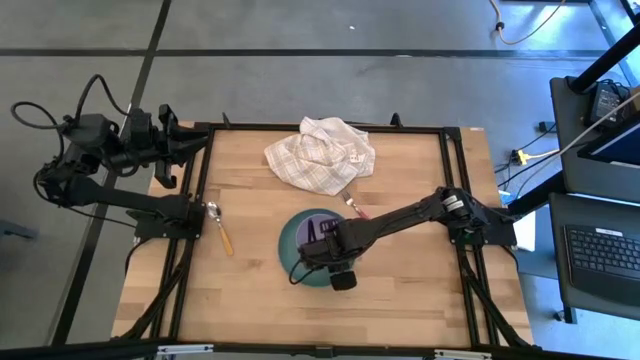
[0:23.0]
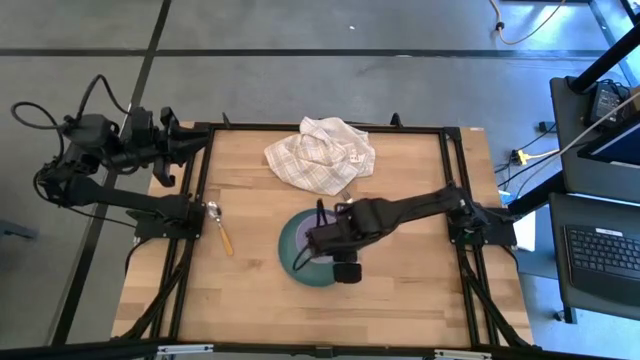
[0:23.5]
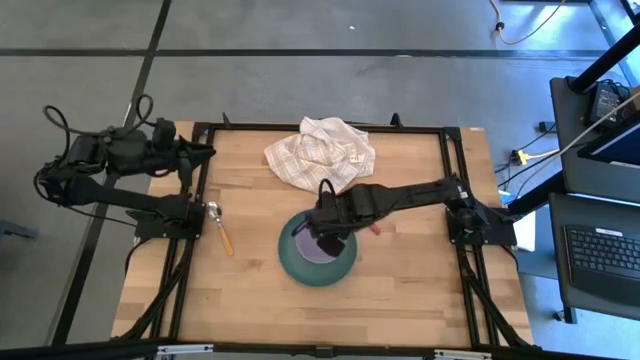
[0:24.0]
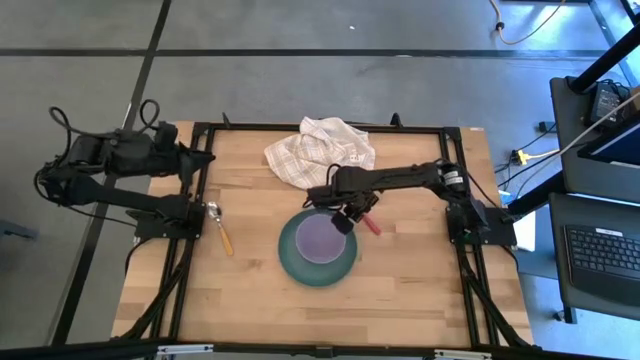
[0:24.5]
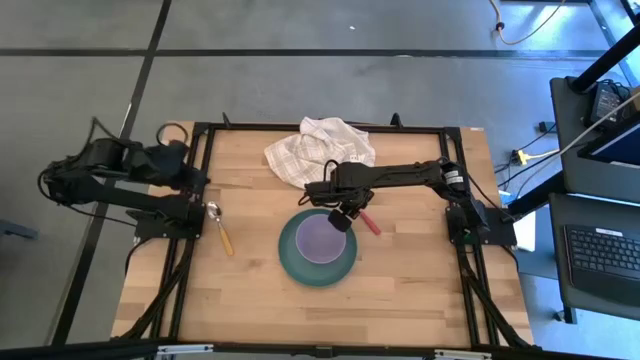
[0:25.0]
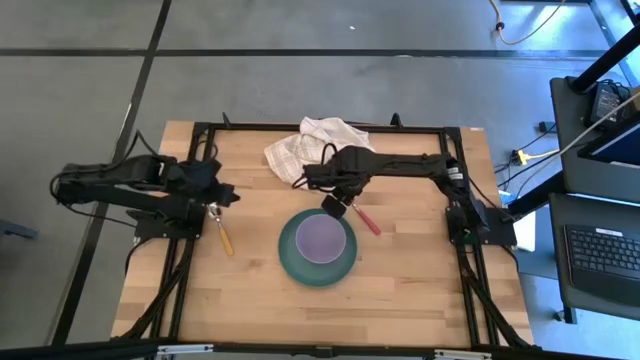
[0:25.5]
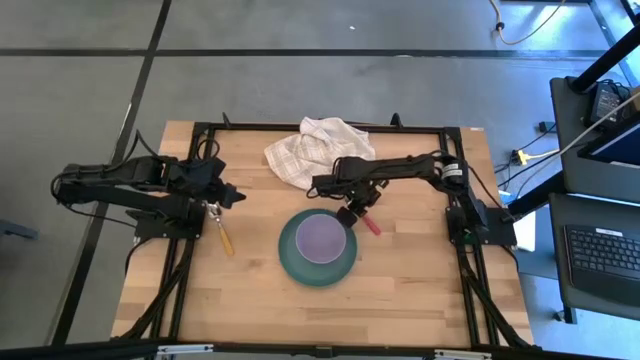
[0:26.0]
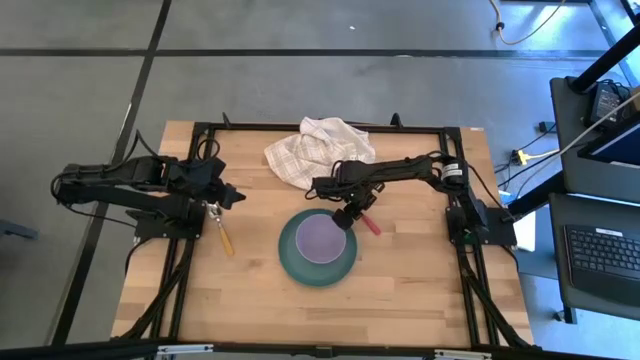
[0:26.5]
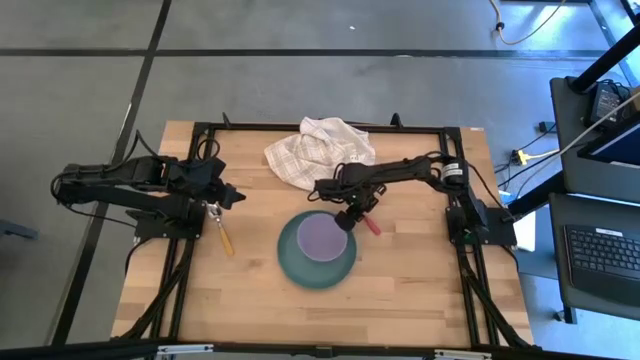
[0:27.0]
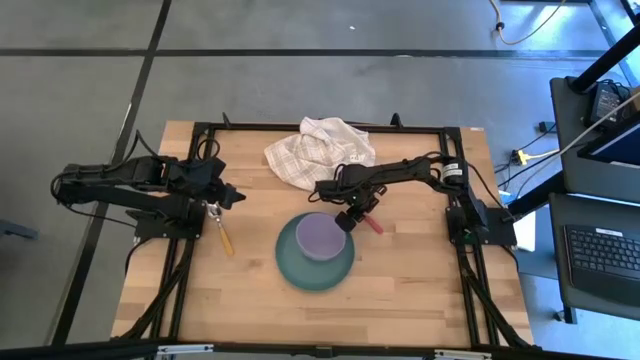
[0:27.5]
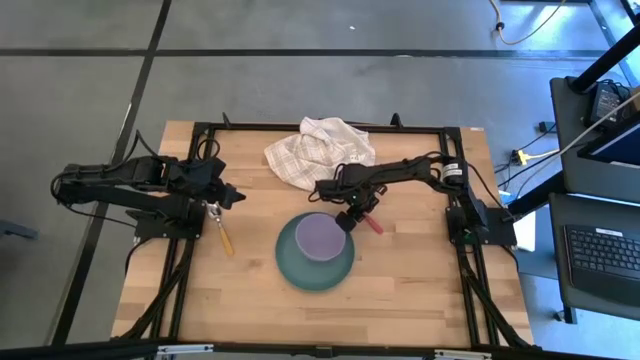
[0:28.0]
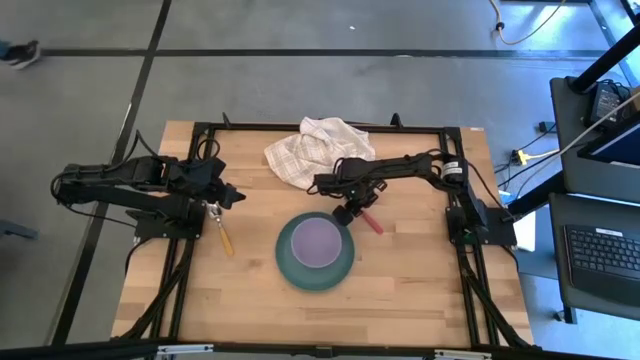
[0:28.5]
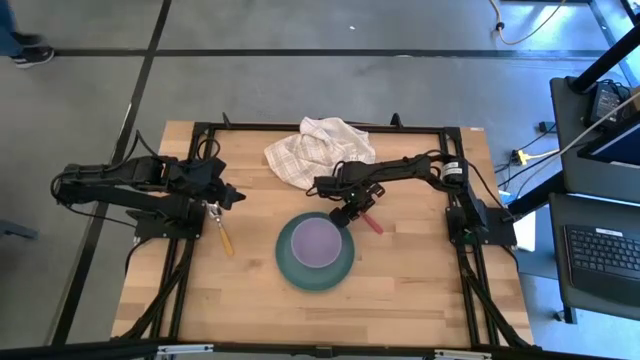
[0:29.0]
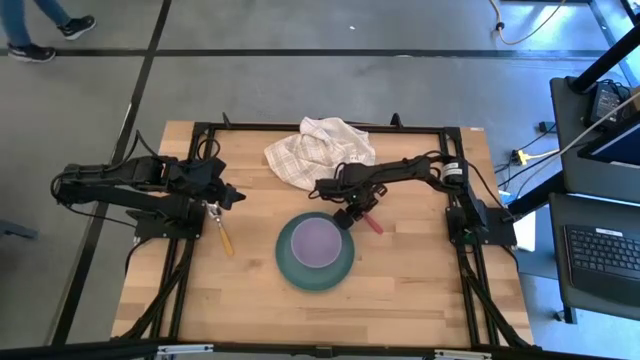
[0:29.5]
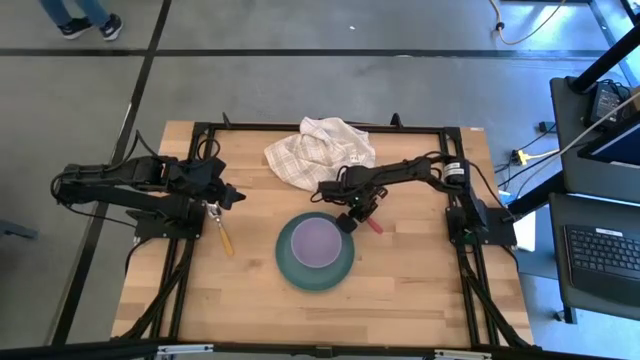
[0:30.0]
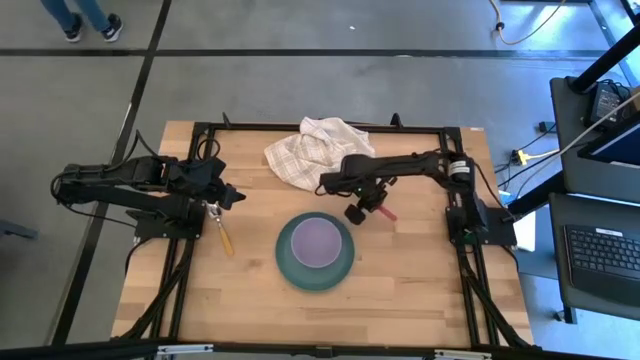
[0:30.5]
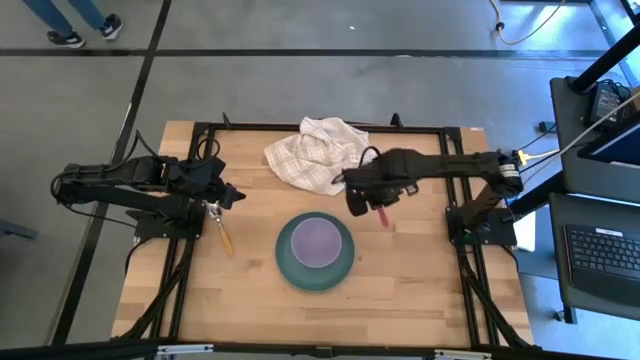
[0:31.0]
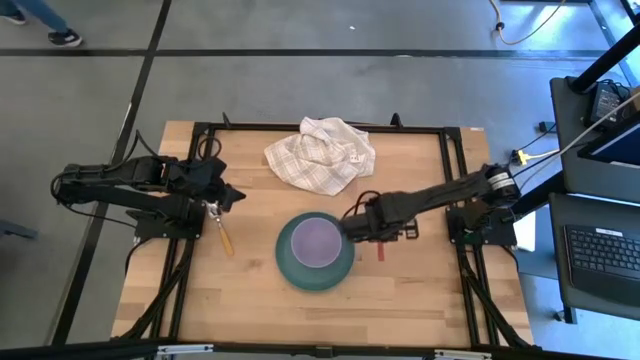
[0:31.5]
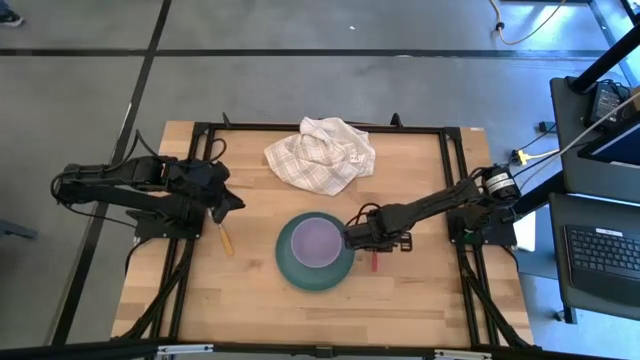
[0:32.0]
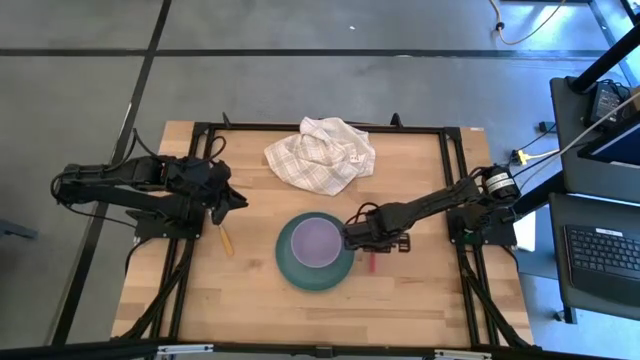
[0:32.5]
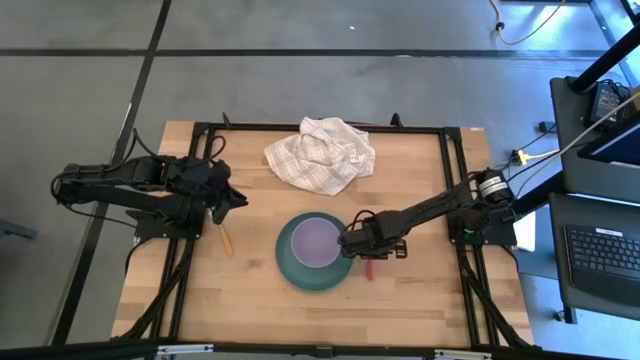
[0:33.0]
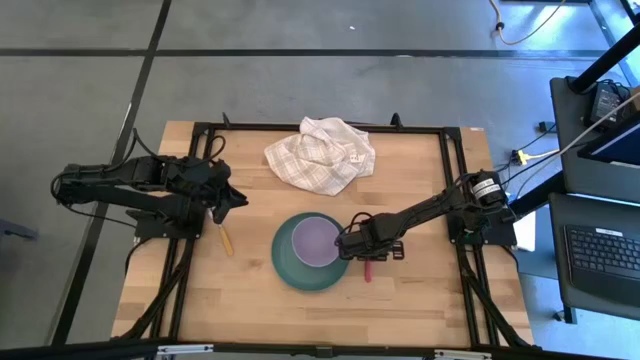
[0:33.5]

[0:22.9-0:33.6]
Task: Set table place
Put the red fork on the right of the light blue plate on the table

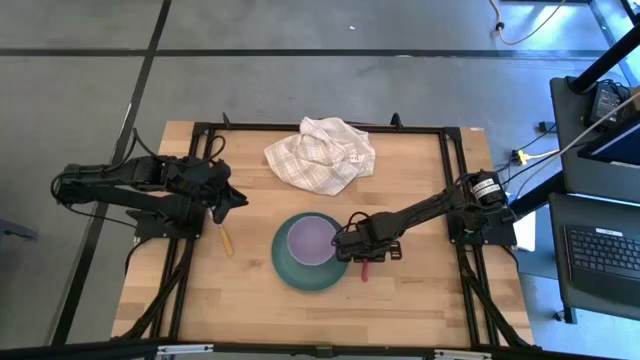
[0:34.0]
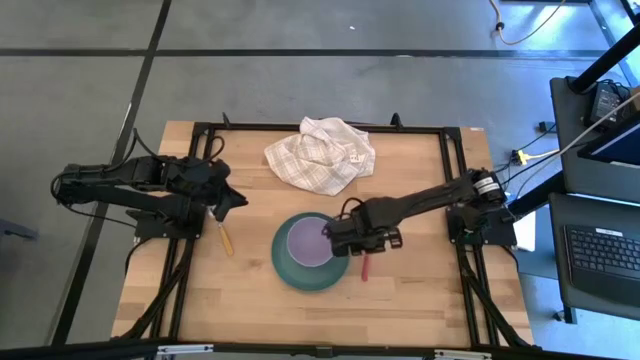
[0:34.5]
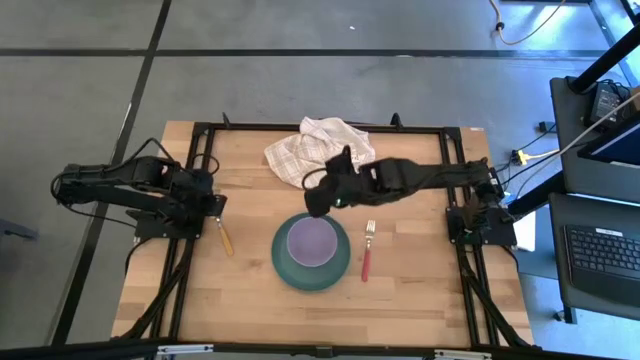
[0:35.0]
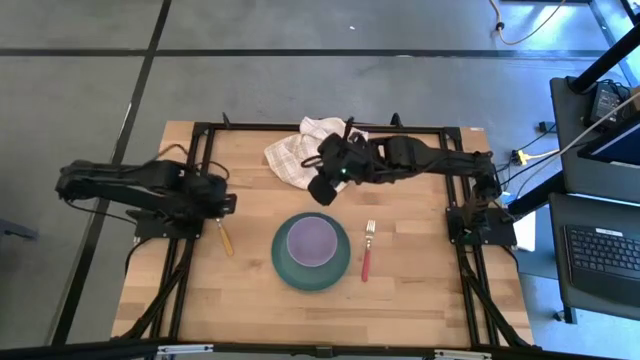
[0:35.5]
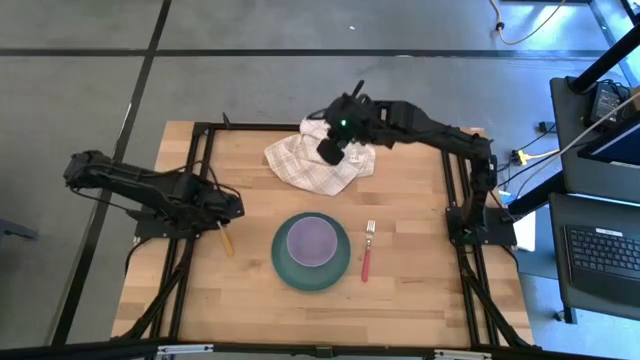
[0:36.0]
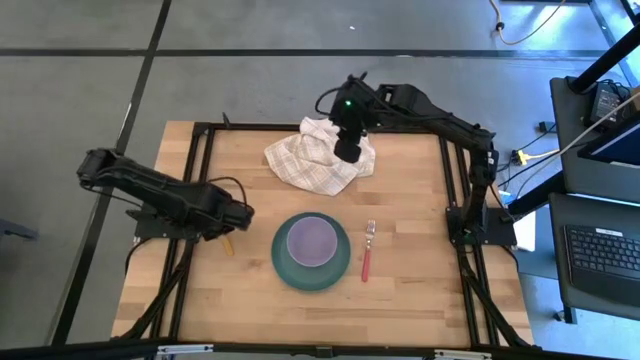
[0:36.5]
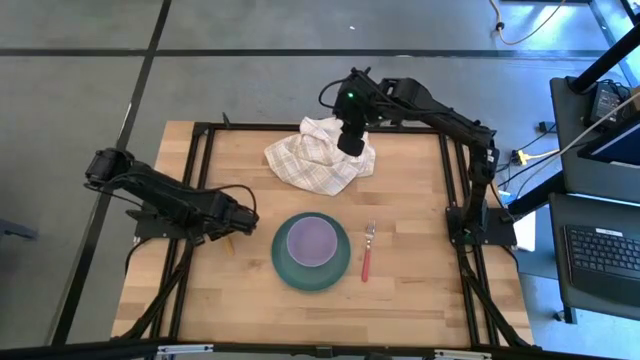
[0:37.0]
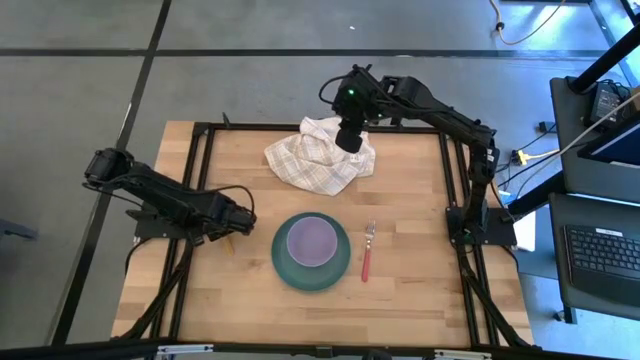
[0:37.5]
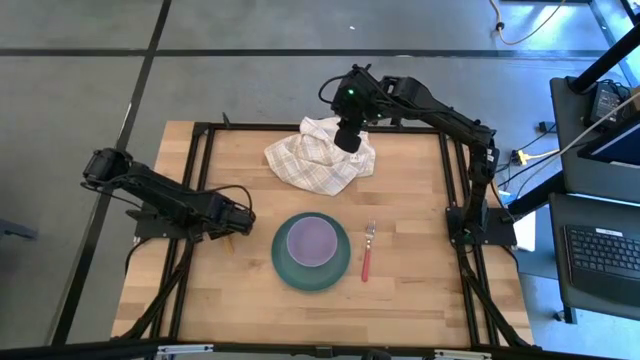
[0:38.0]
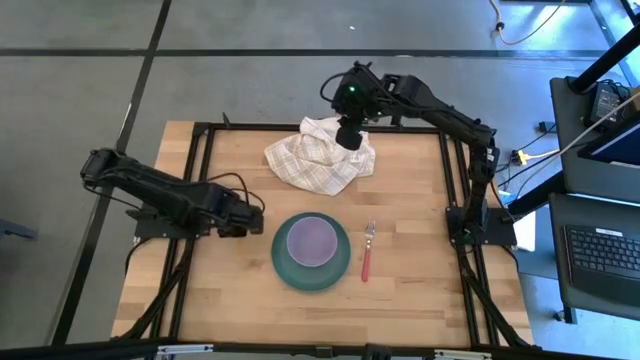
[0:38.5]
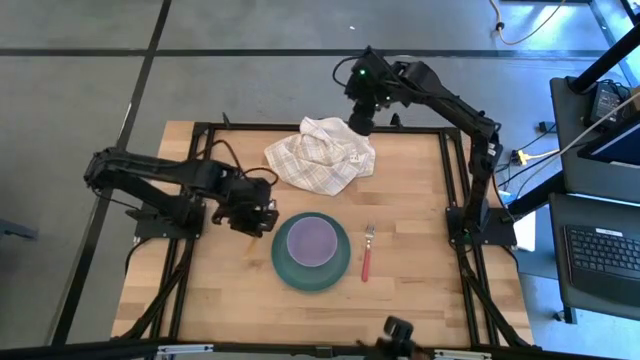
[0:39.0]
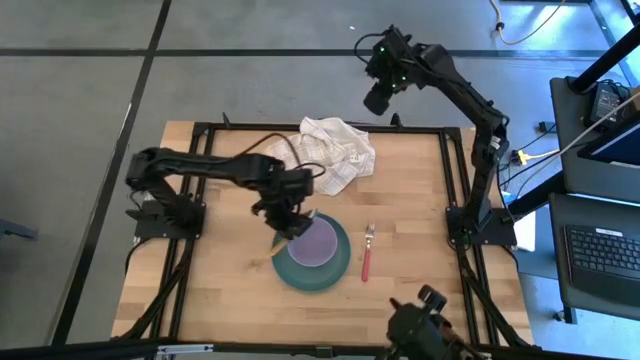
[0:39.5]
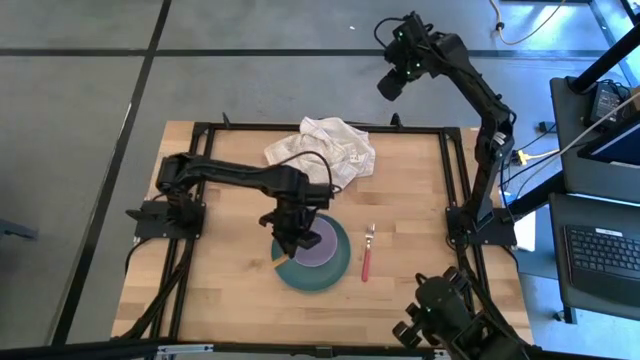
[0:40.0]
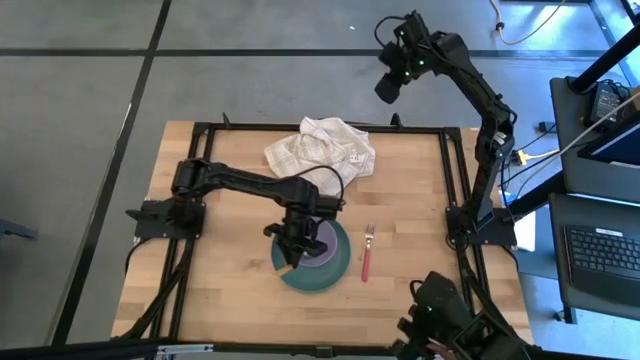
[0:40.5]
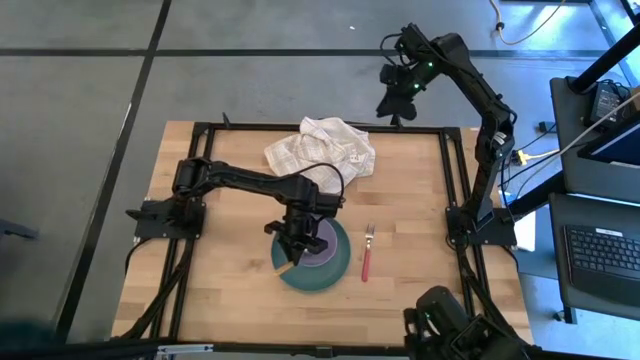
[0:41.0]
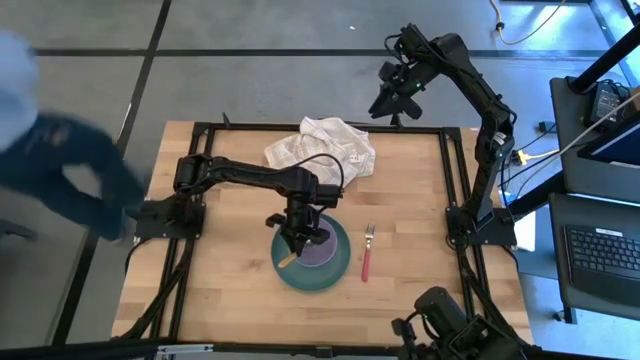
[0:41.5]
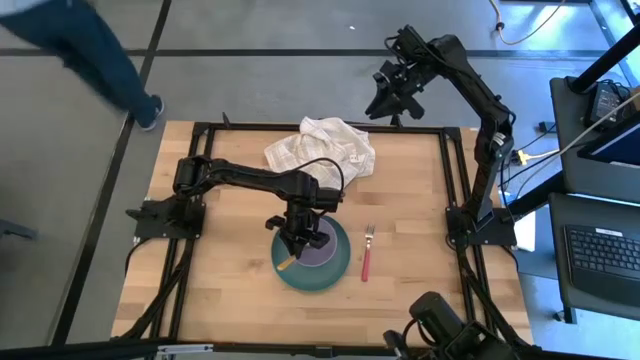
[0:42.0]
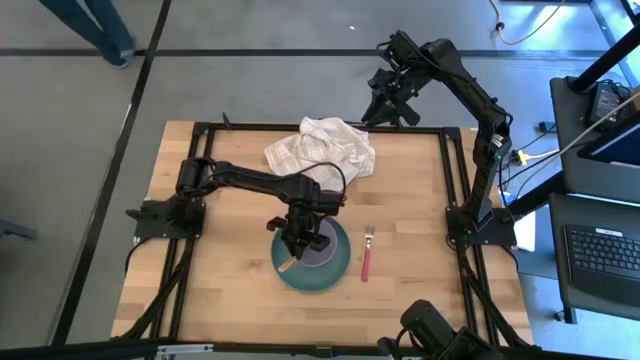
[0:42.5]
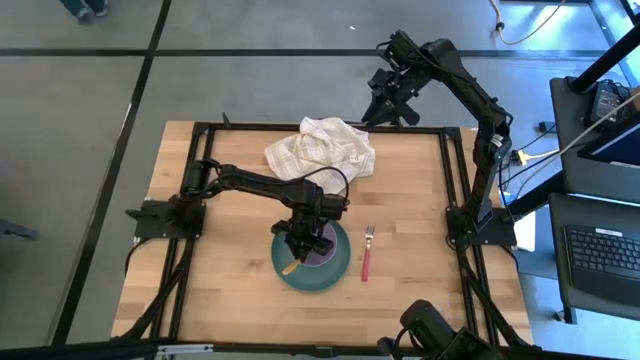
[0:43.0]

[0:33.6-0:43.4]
Put the yellow spoon on the purple bowl

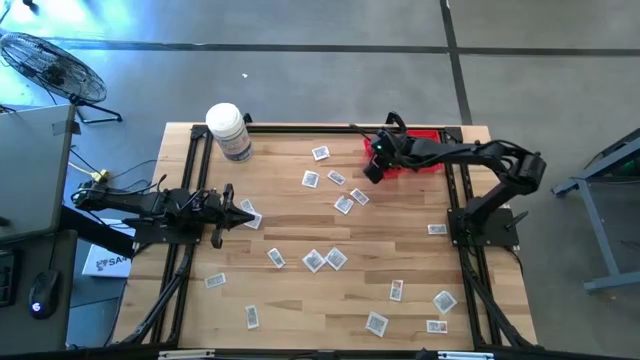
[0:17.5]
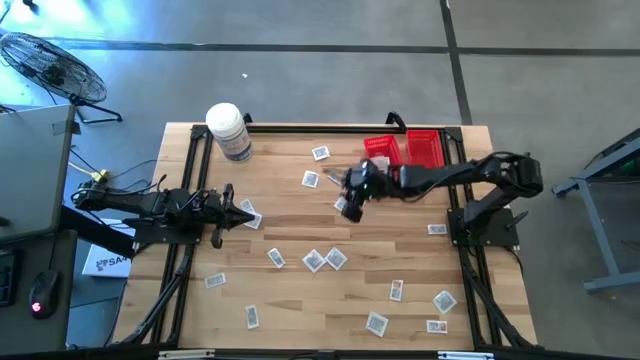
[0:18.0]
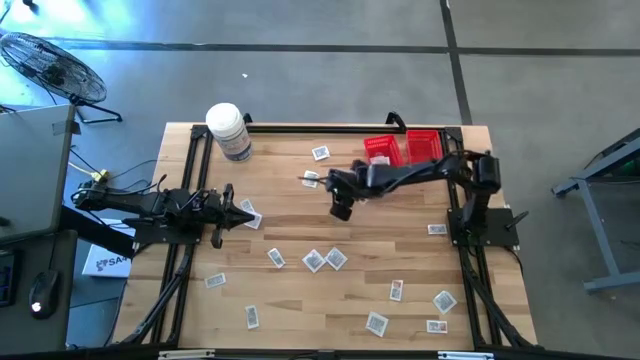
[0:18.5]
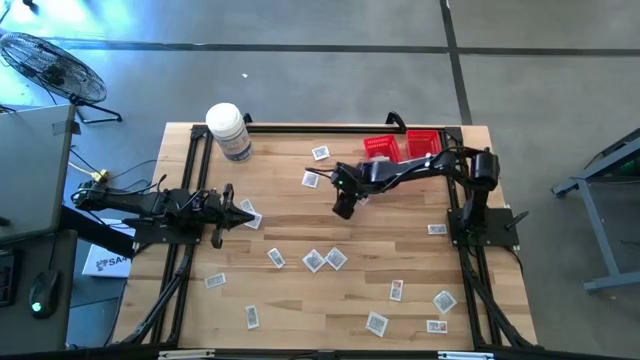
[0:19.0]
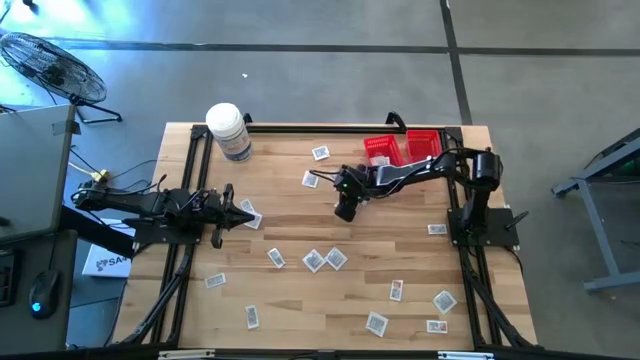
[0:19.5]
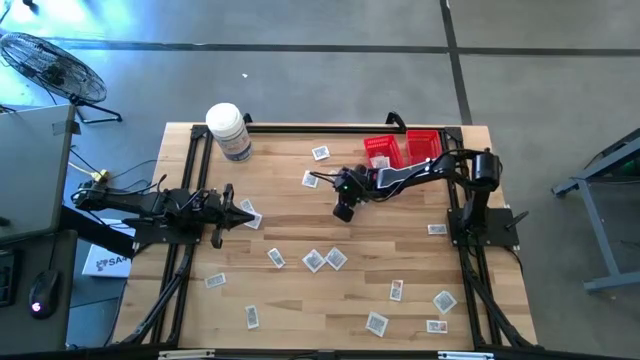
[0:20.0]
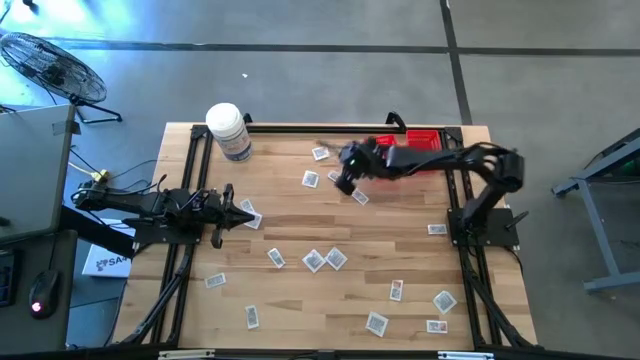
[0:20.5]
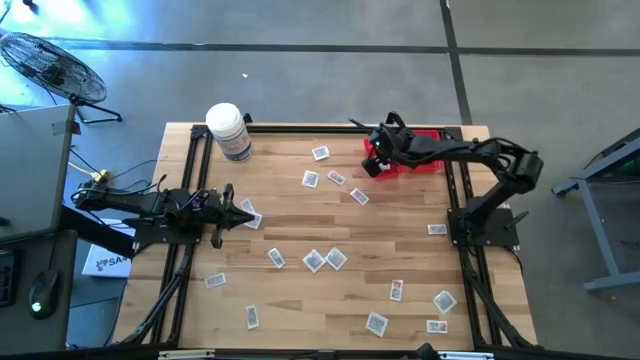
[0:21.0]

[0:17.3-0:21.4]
Task: Pick & Place First Aid Supplies
Put the towelette pack into the left red bin
